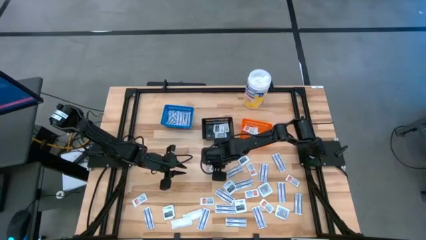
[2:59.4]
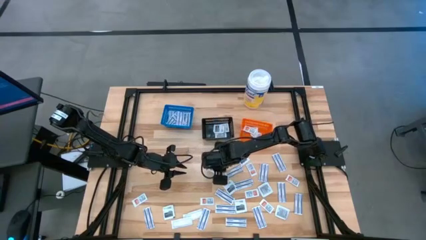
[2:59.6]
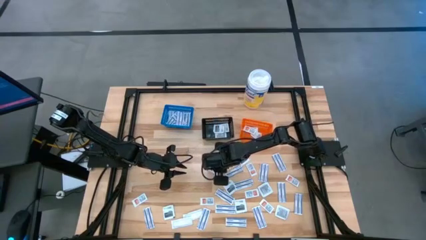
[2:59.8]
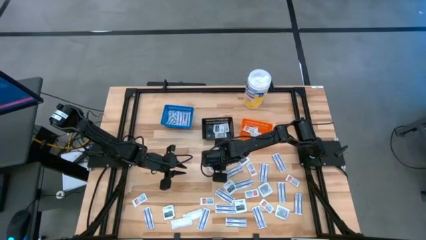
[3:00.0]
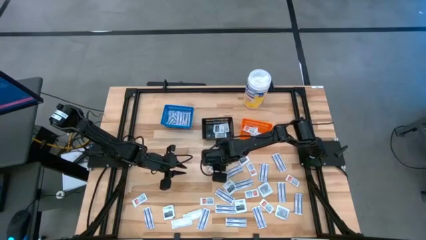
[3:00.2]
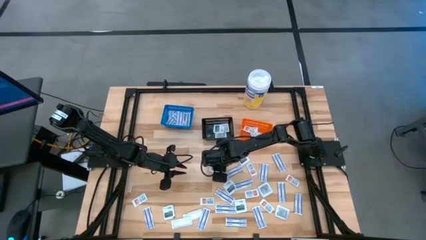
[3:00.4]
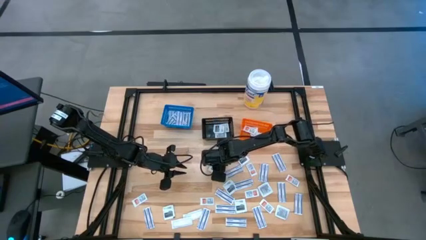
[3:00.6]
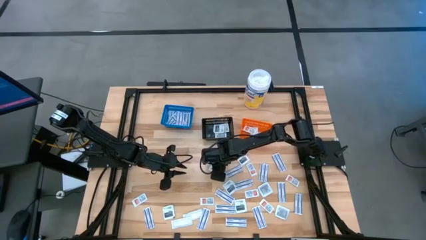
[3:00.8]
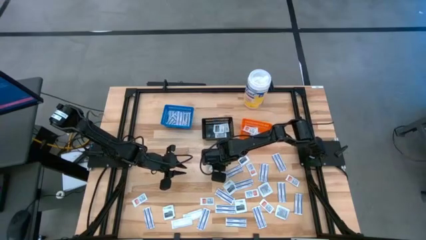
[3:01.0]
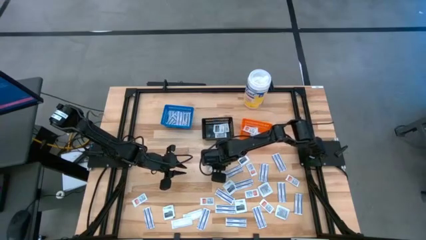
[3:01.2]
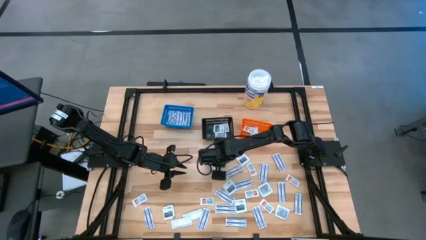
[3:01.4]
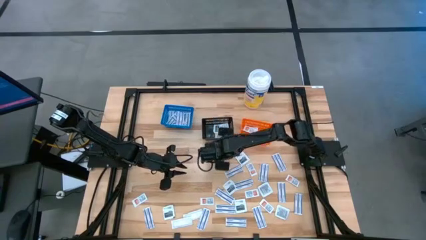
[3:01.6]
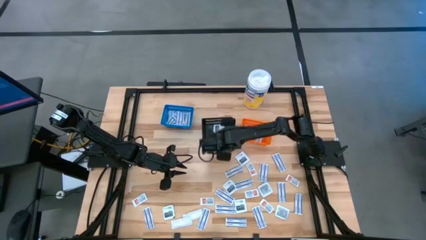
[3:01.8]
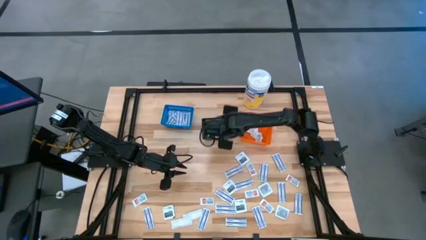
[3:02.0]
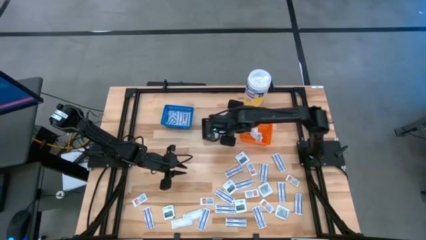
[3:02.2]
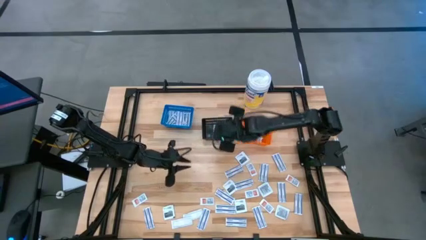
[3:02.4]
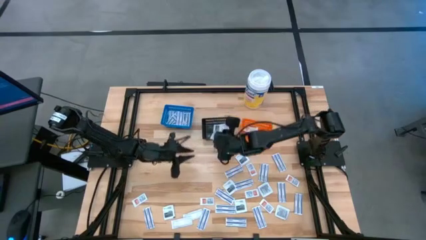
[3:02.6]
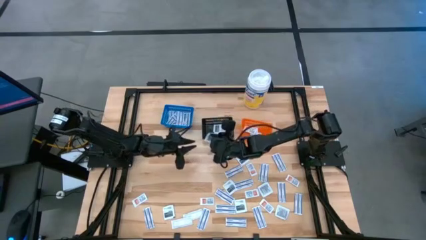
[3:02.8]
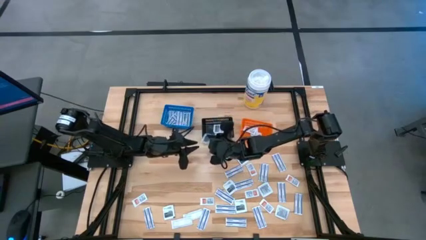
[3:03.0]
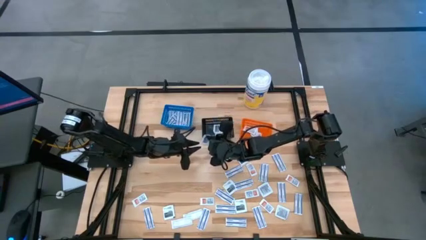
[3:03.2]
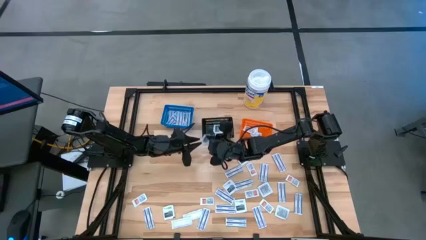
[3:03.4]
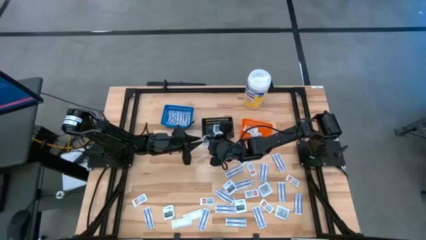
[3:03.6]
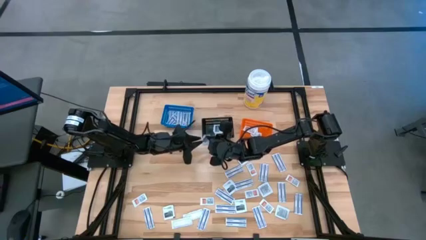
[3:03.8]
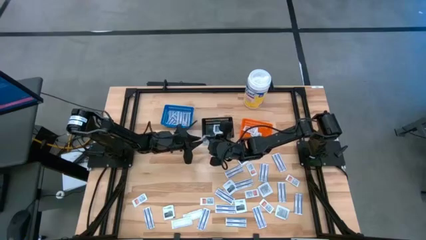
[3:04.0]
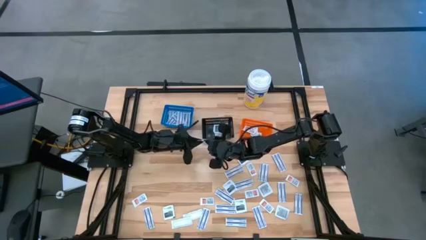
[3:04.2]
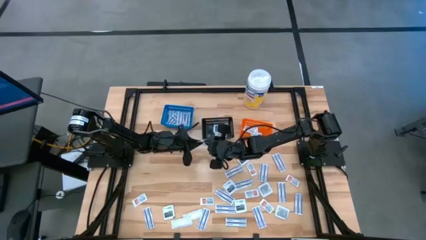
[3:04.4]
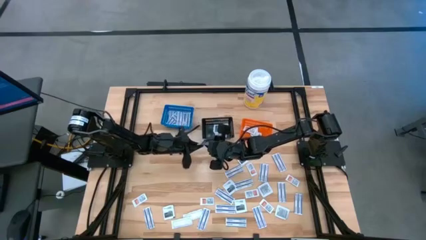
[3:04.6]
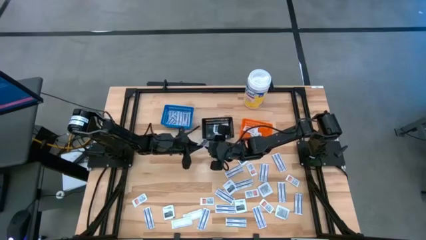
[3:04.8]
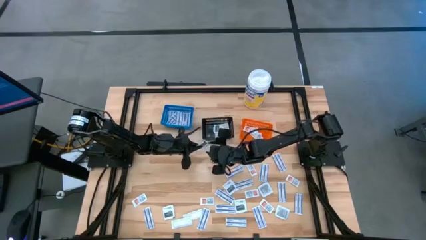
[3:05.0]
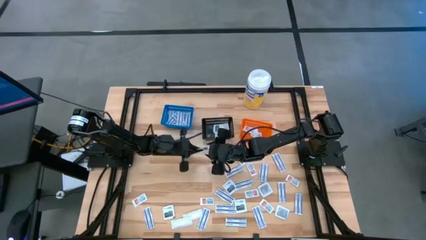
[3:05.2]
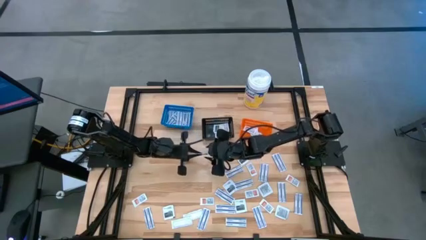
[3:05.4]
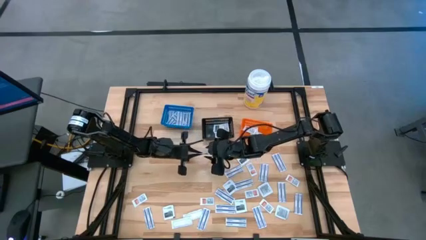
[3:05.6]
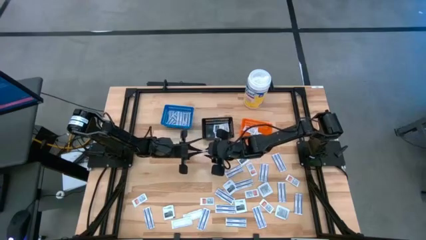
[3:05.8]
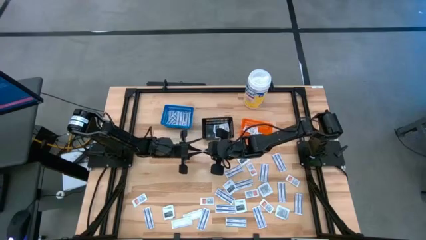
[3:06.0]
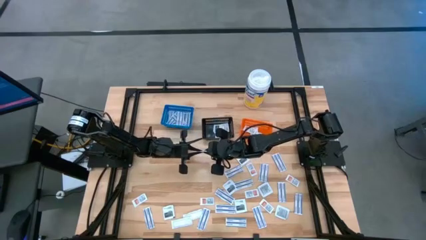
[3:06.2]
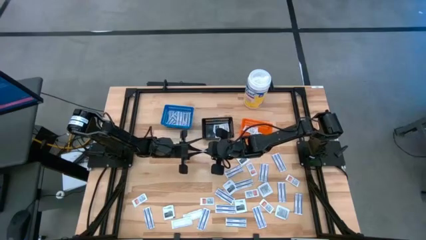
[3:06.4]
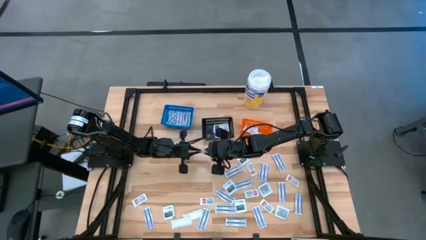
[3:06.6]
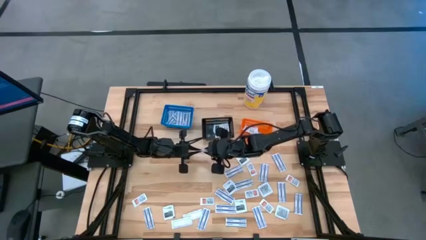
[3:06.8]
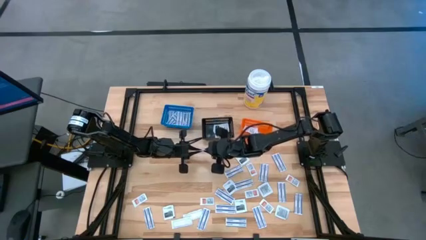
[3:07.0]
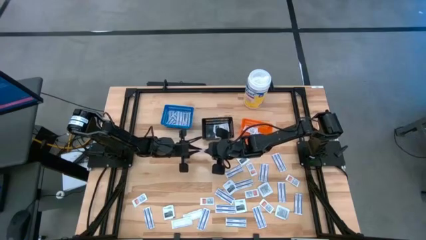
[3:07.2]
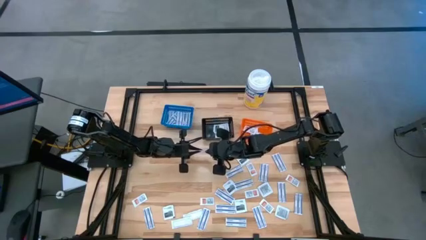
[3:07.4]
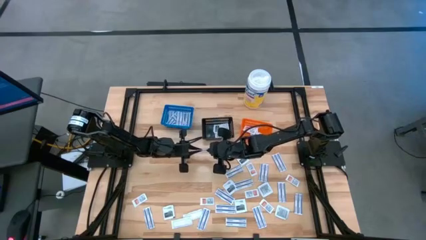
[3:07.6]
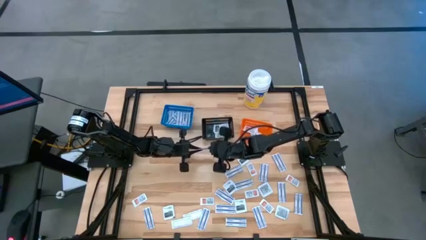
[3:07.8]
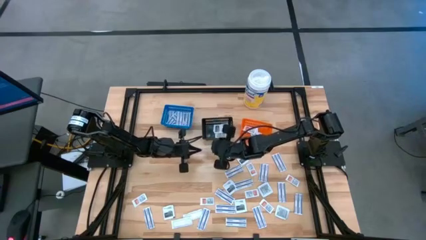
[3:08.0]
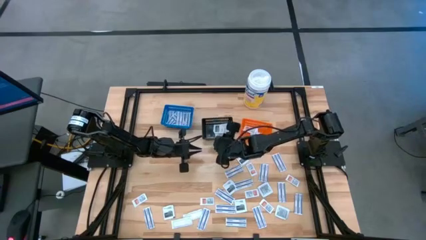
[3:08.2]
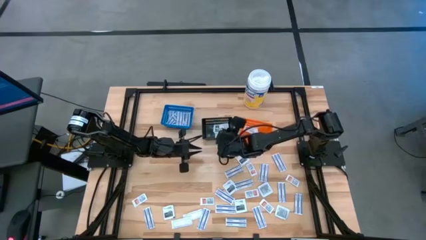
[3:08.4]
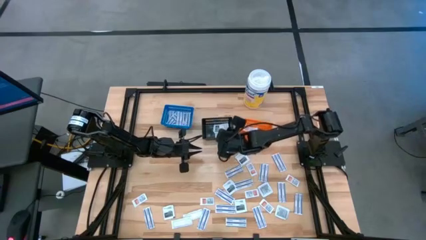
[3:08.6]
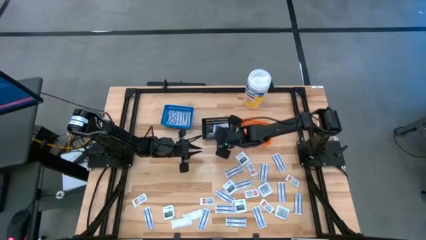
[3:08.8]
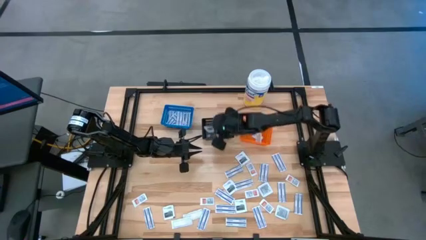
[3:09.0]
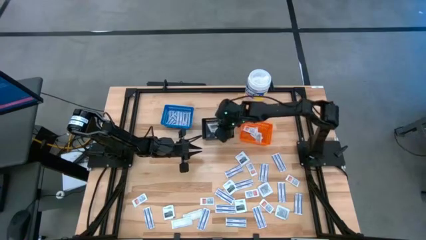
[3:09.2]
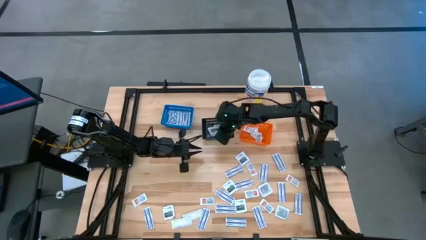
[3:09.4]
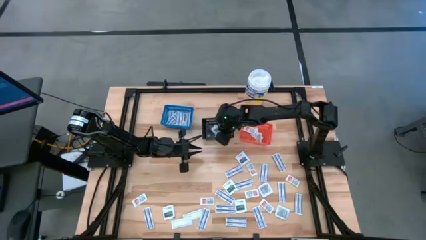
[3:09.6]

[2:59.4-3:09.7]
Task: Pick & Place First Aid Supplies
Put the towelette pack into the black bin

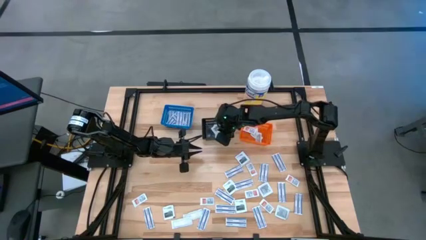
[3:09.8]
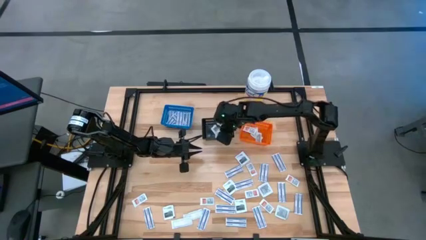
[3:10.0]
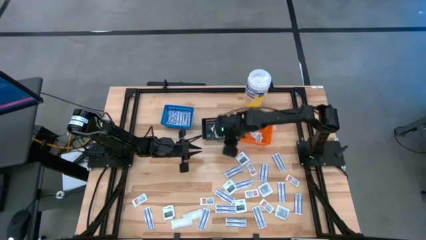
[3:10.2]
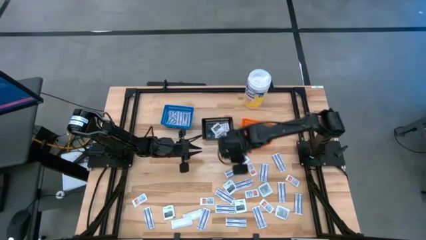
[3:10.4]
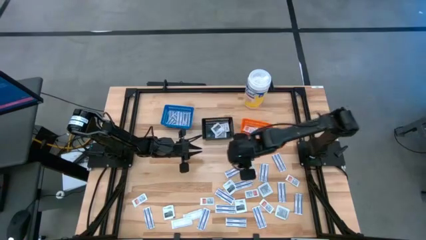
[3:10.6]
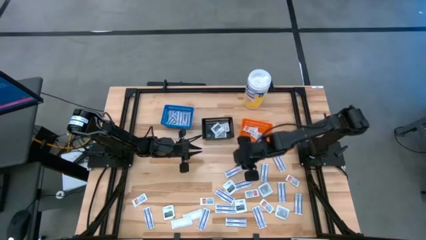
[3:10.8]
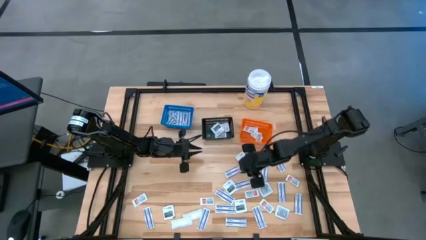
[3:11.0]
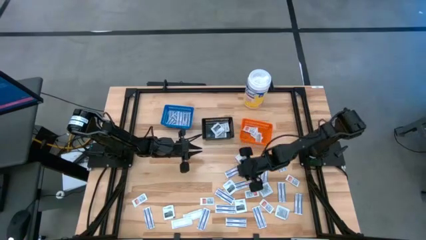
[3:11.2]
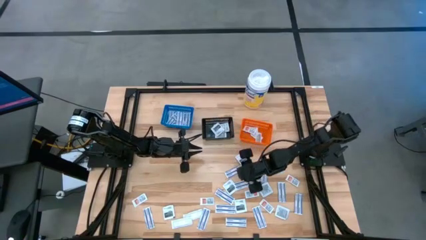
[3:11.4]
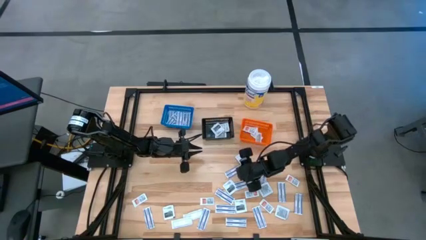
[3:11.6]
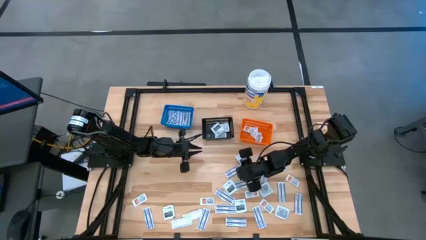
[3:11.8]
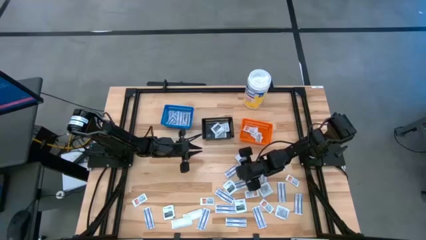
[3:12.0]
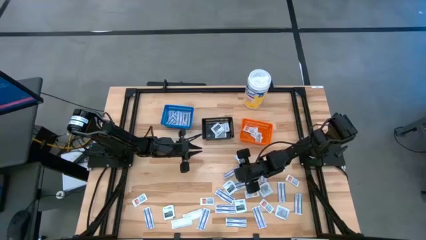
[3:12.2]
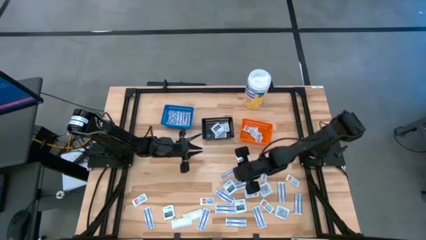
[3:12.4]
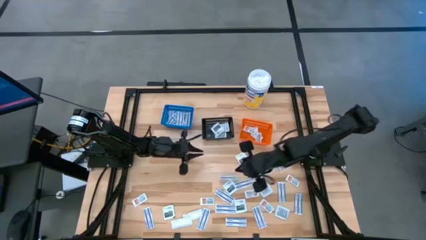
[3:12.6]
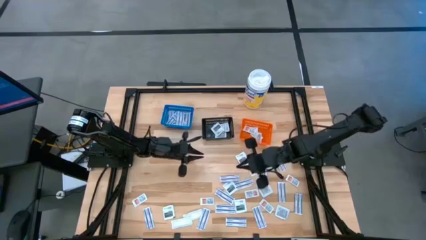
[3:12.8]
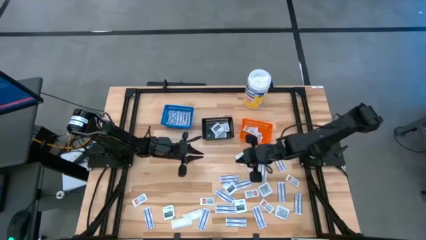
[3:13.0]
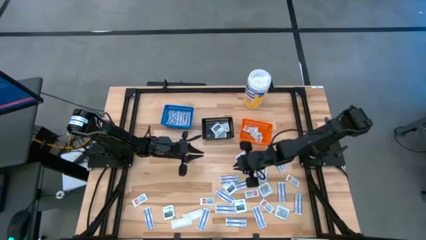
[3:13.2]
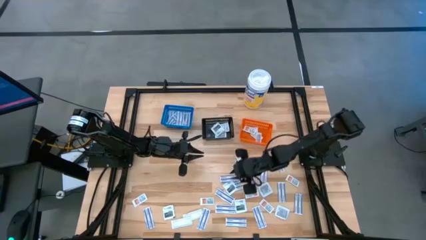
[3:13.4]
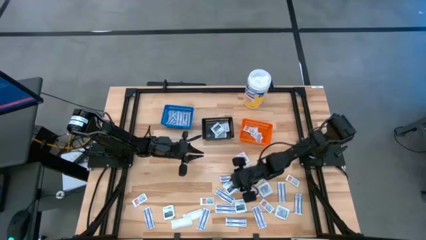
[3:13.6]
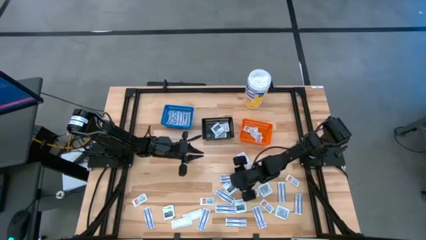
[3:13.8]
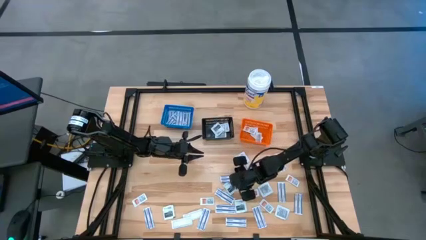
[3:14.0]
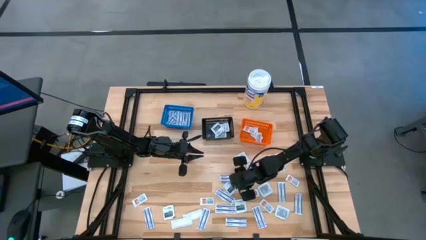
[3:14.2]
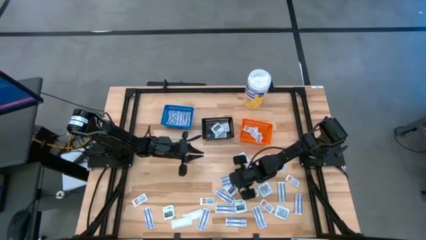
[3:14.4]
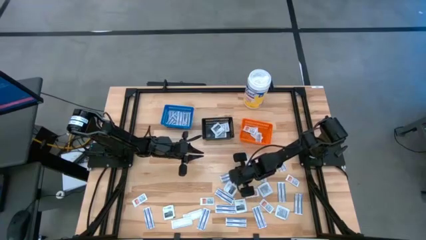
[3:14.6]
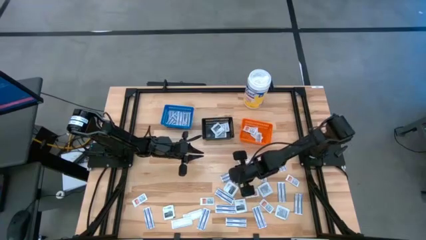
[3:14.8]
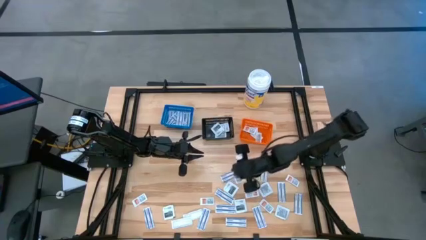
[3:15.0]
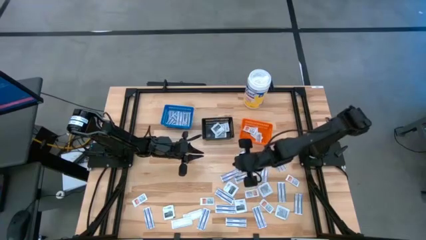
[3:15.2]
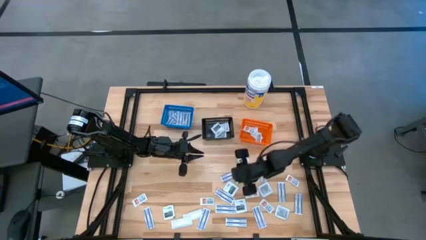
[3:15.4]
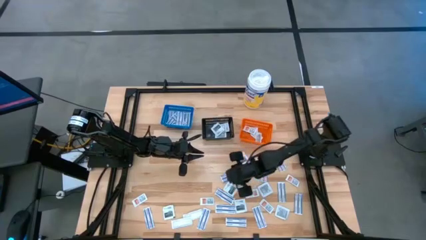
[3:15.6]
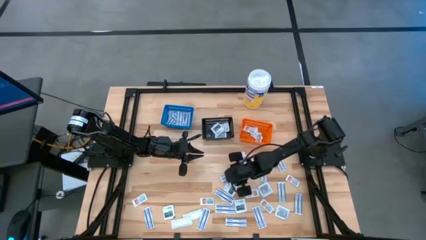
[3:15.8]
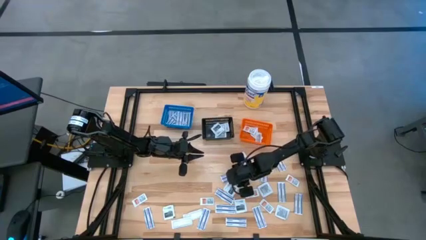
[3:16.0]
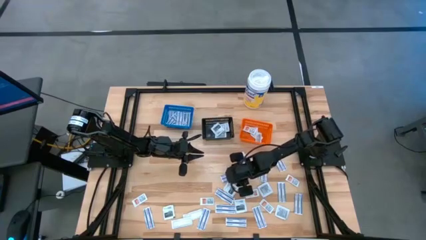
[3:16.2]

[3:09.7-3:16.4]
Put the bandage into the blue container
